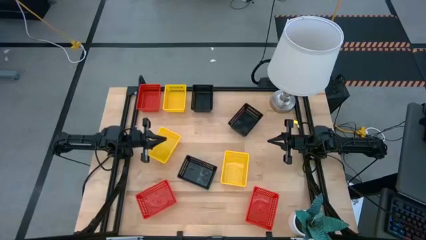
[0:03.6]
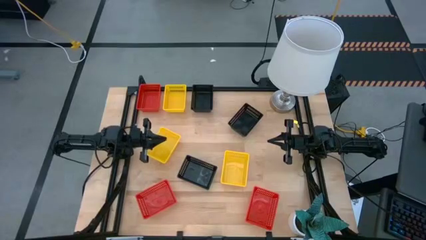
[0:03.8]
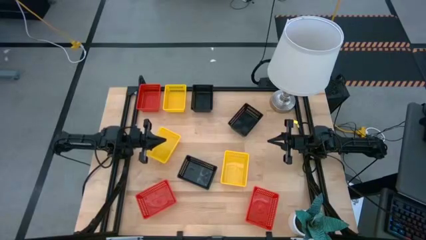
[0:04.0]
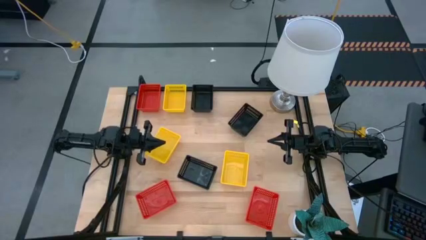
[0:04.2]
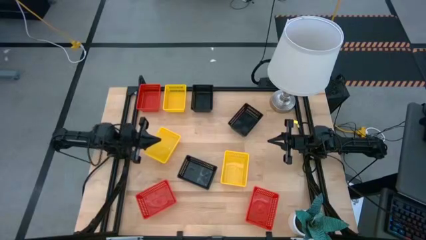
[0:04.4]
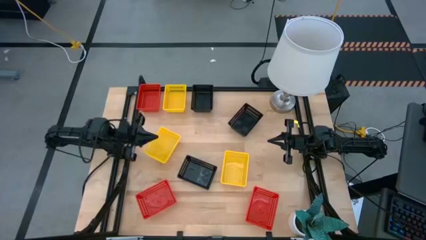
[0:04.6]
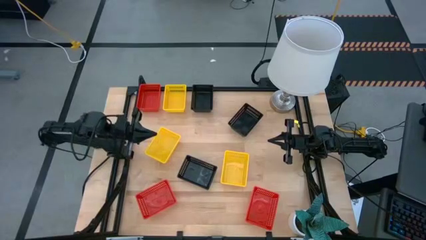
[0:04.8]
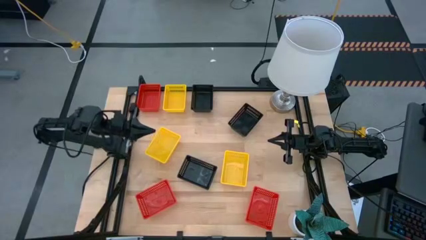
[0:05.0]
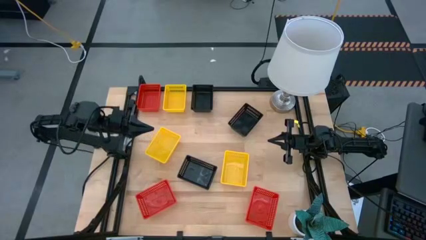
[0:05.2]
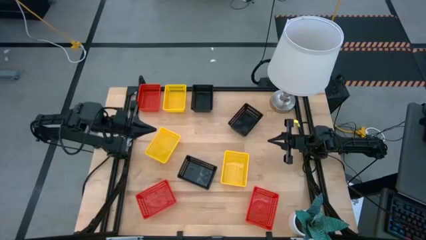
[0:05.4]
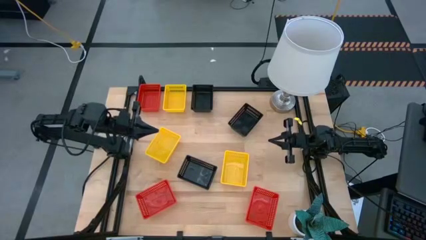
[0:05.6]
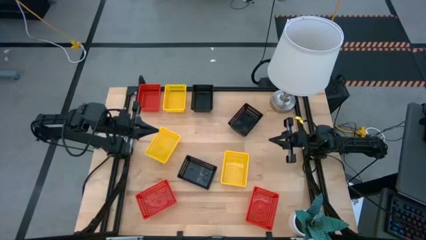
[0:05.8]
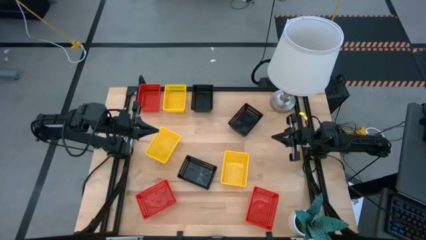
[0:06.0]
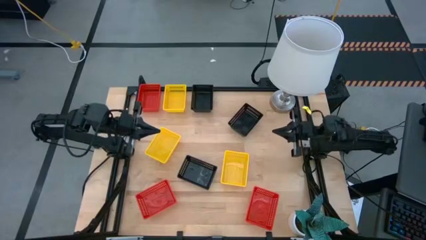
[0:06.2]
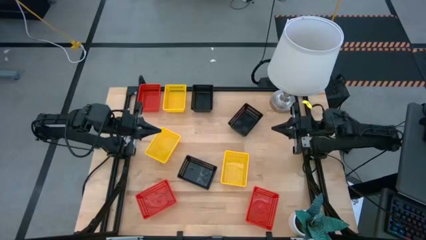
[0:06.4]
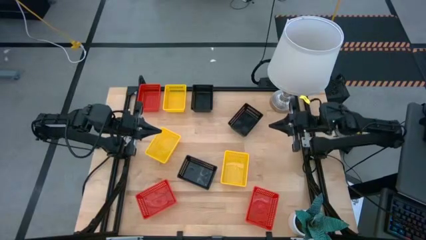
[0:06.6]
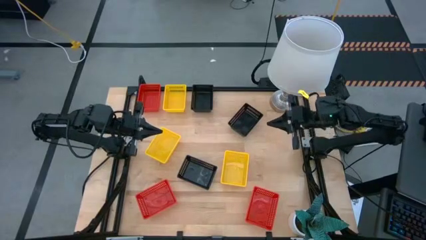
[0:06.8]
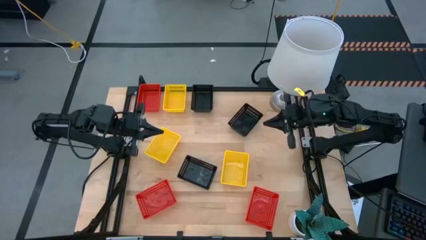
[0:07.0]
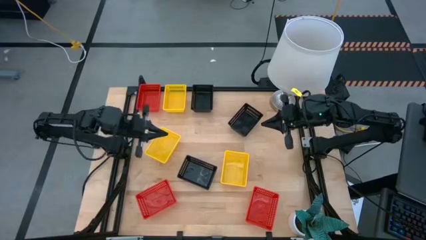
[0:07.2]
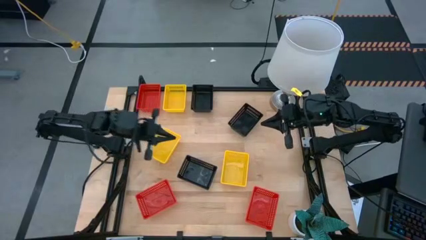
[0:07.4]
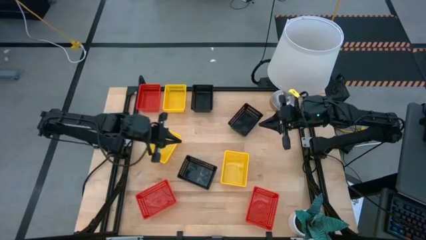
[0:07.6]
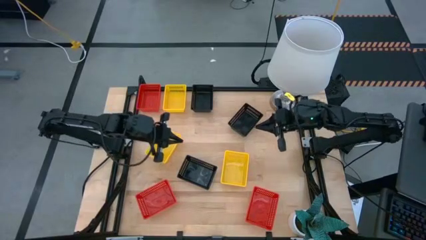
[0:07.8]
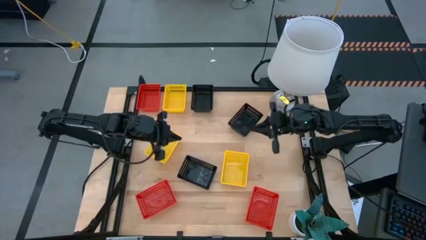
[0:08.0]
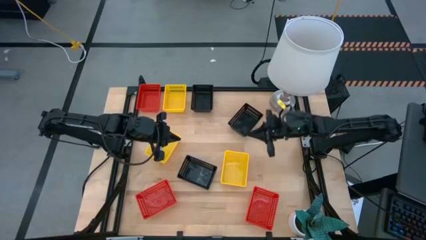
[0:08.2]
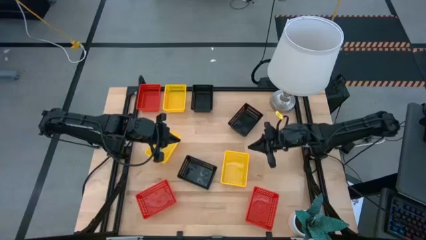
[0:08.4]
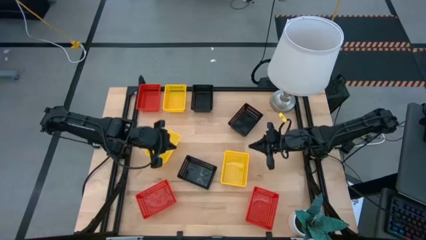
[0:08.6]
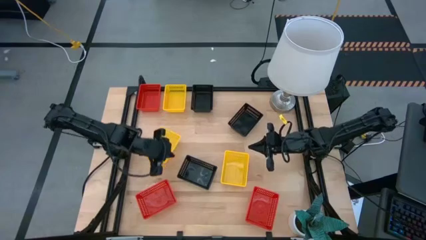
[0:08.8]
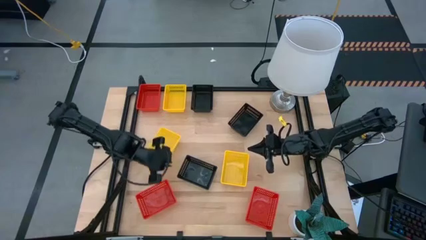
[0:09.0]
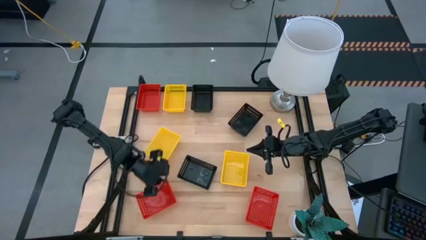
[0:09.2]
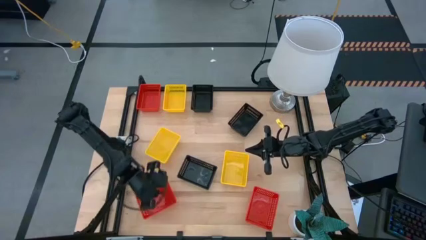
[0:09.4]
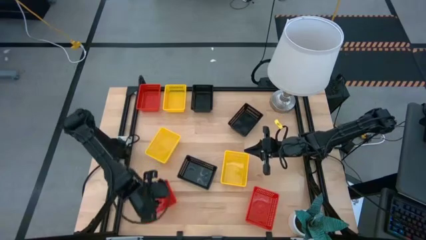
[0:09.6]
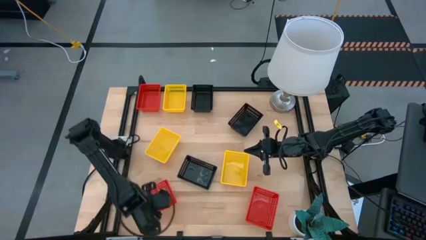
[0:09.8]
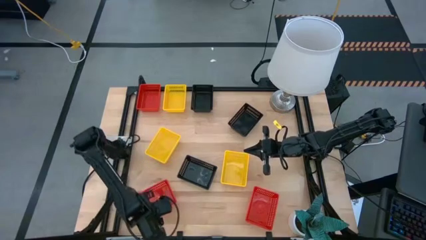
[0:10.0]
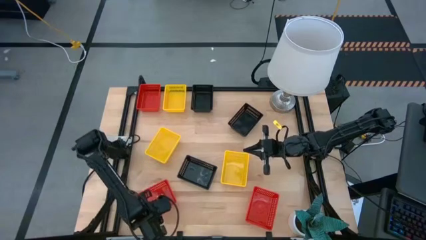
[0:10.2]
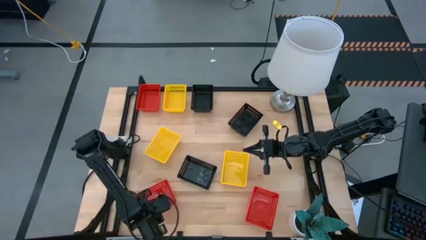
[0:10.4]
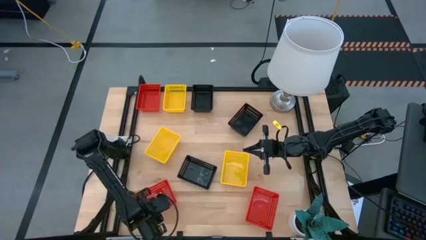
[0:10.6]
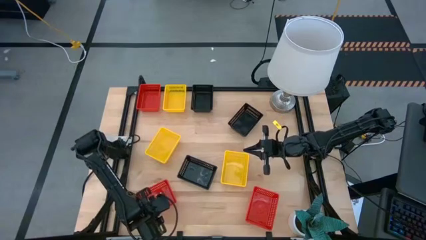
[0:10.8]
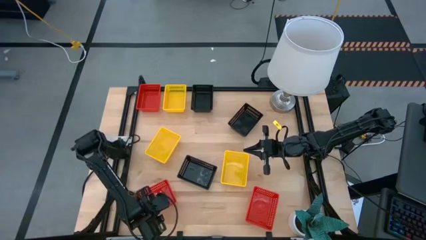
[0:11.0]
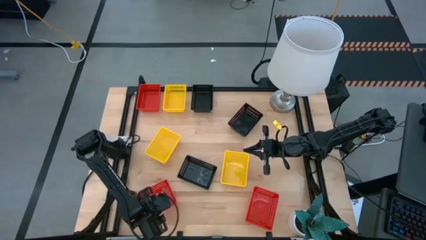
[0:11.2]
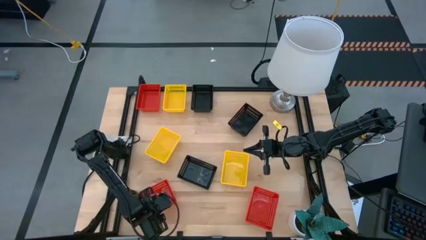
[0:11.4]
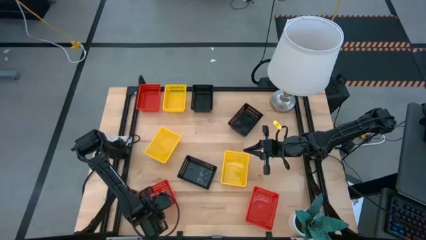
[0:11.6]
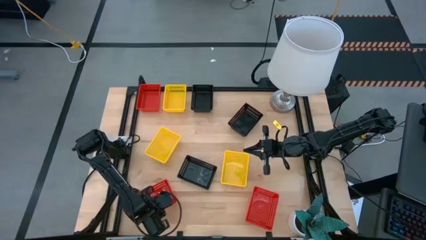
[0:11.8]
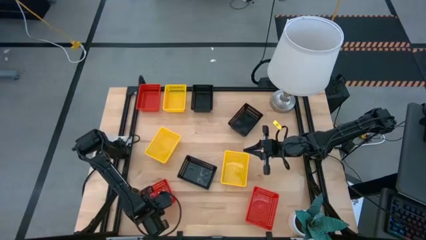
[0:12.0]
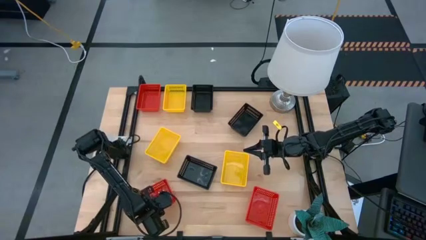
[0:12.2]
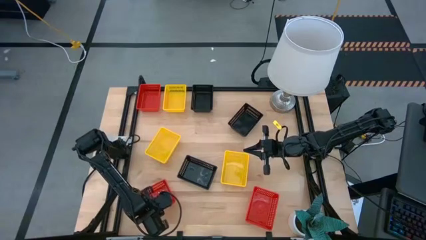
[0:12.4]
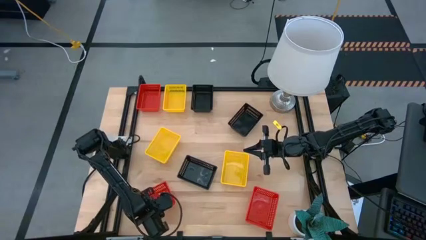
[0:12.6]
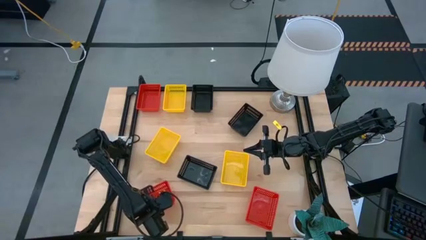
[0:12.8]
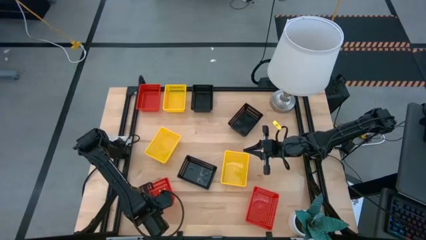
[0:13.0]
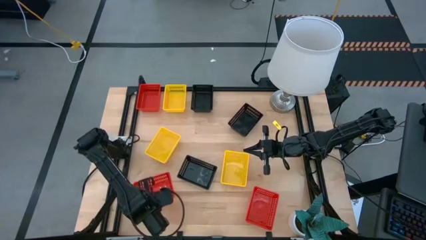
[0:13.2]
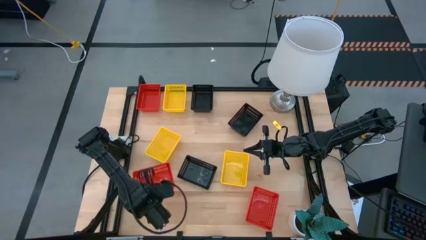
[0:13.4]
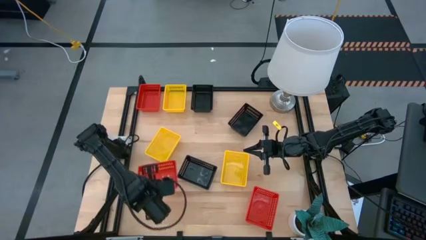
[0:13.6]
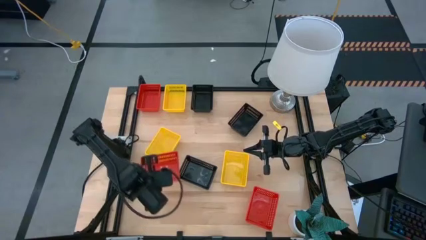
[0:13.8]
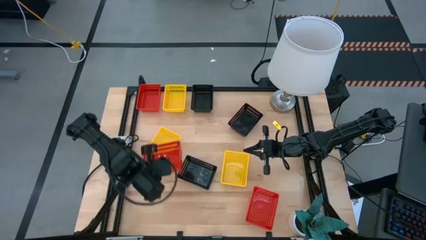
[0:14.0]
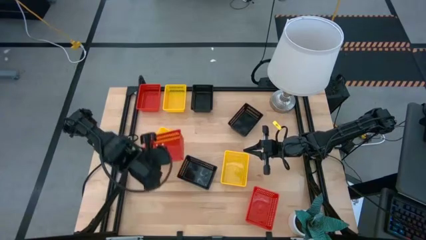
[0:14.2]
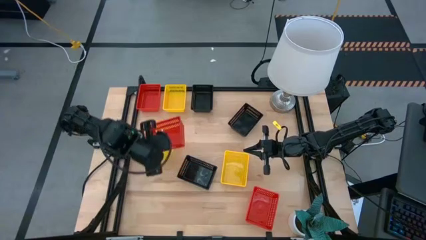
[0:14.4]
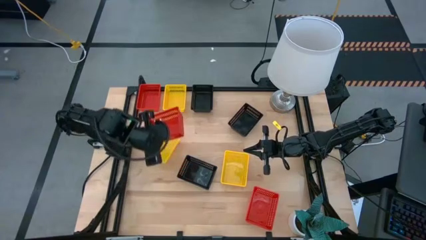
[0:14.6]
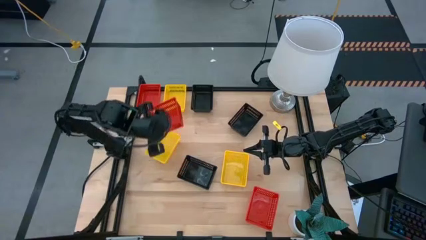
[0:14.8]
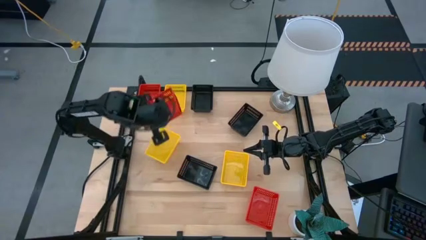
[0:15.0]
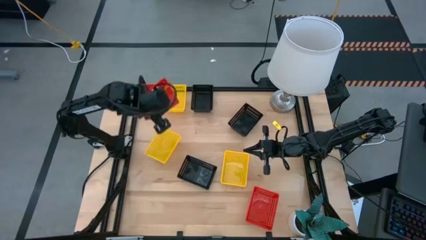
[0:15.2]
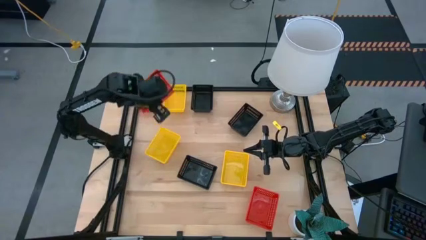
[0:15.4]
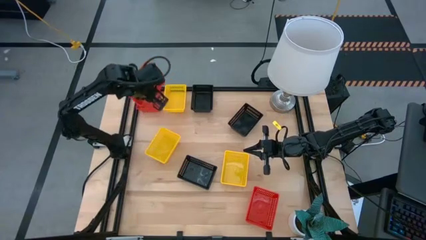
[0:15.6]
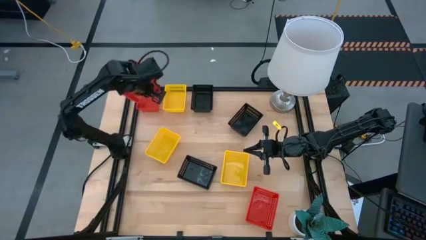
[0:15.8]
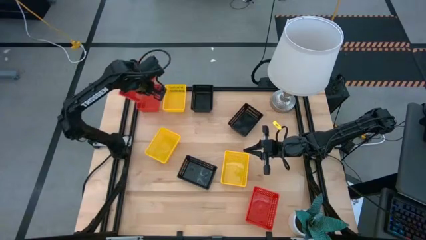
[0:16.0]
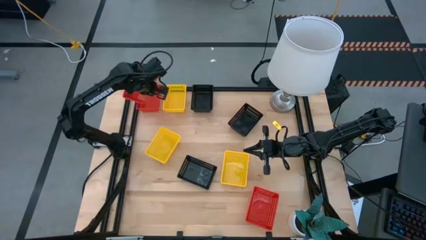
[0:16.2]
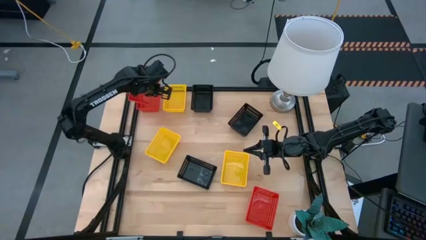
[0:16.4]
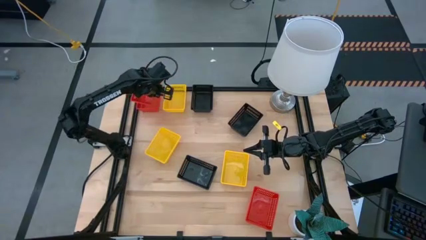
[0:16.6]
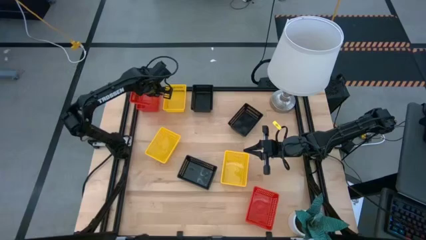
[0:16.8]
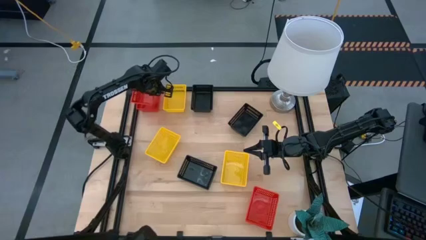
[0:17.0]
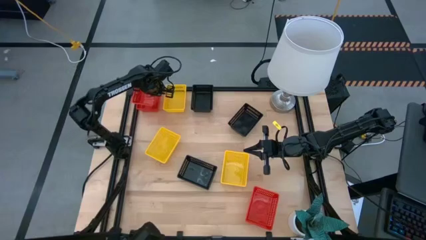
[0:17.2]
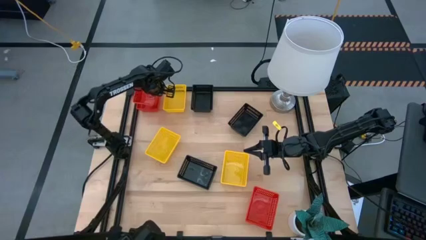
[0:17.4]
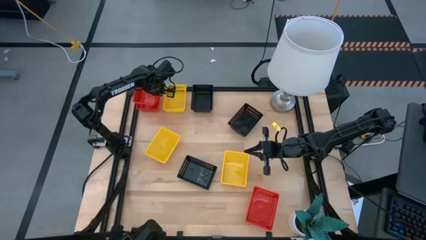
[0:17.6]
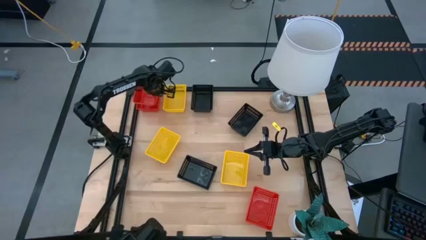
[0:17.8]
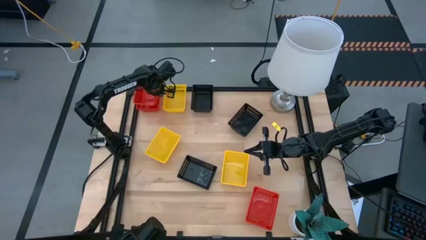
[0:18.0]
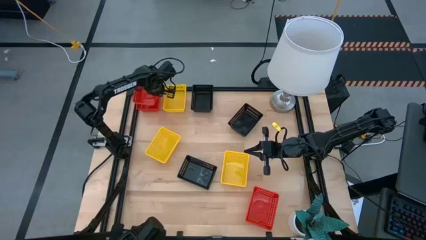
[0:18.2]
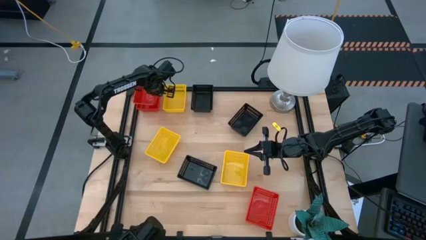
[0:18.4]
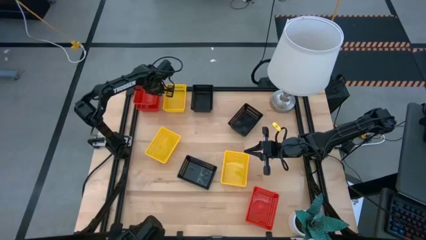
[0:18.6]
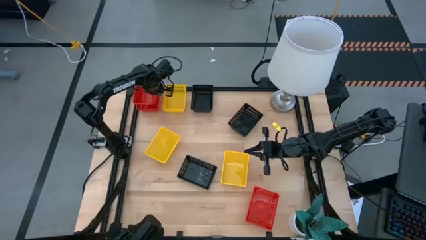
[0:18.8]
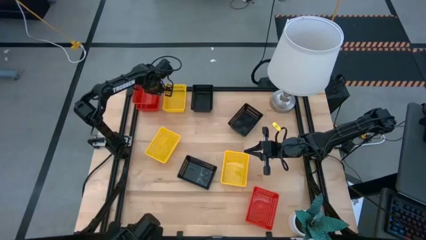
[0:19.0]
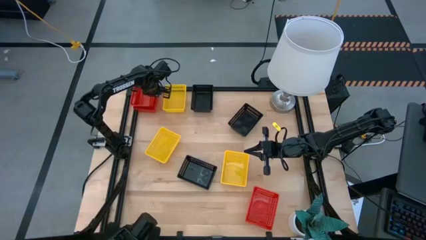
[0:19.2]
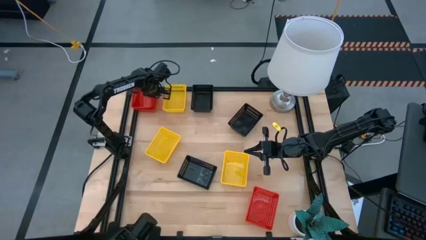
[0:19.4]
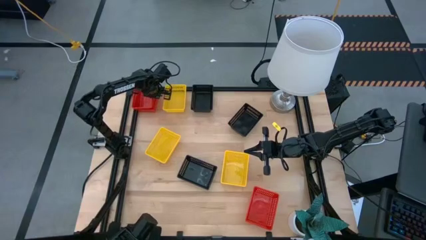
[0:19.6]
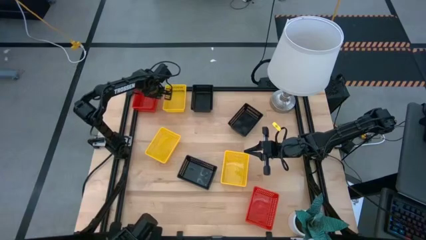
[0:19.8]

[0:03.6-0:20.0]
Stack the bottom left red bin on top of the top red bin
